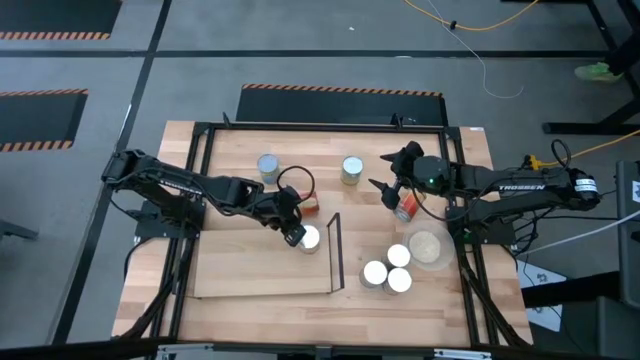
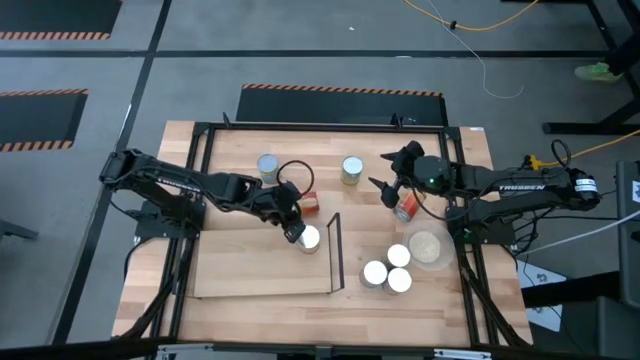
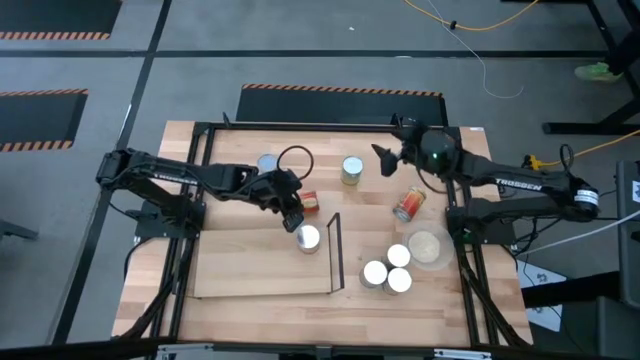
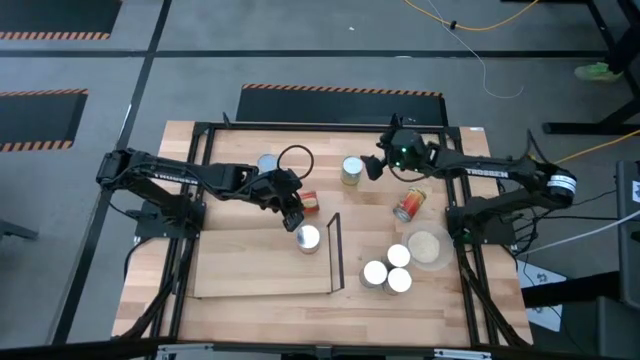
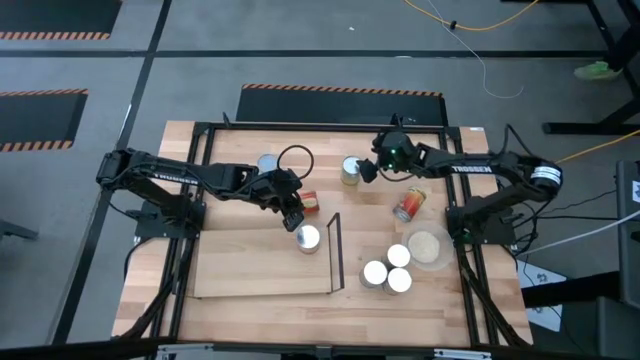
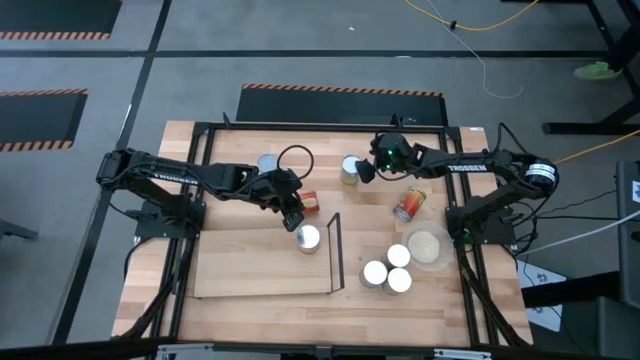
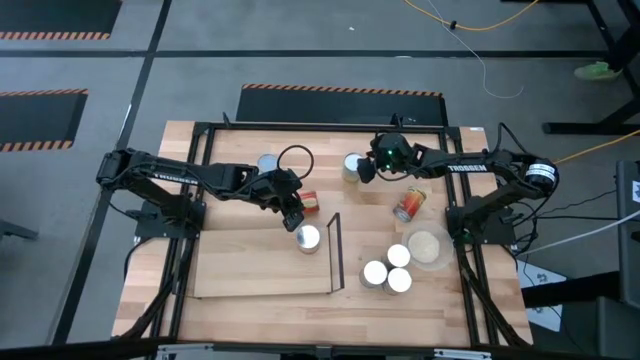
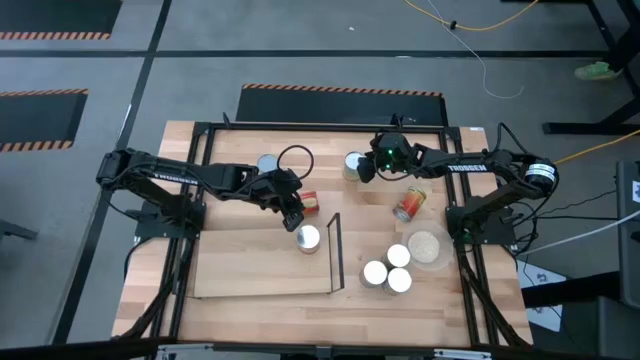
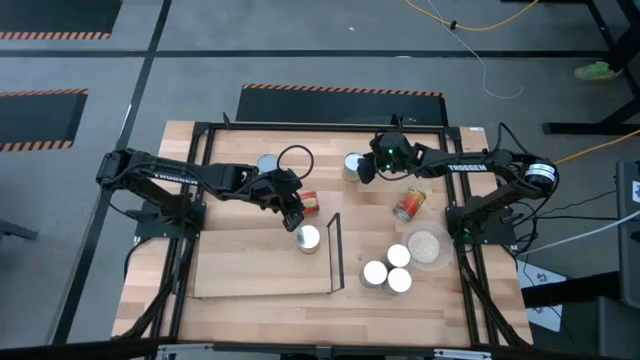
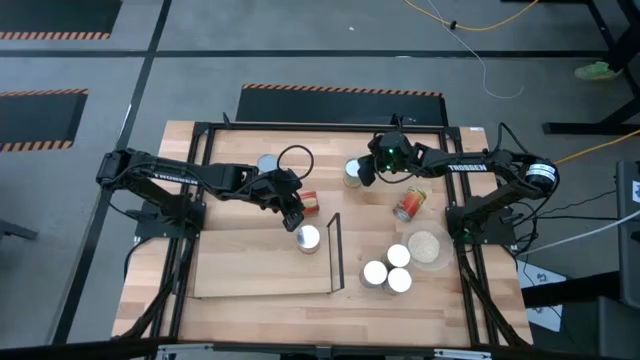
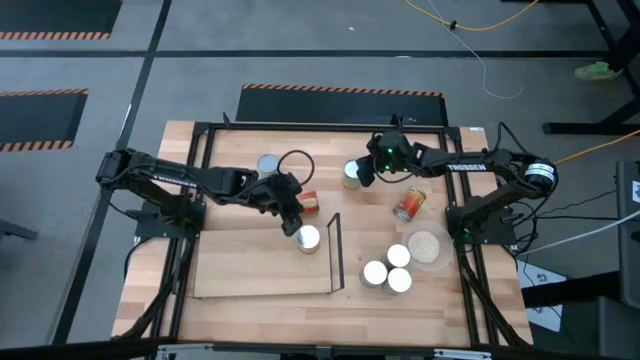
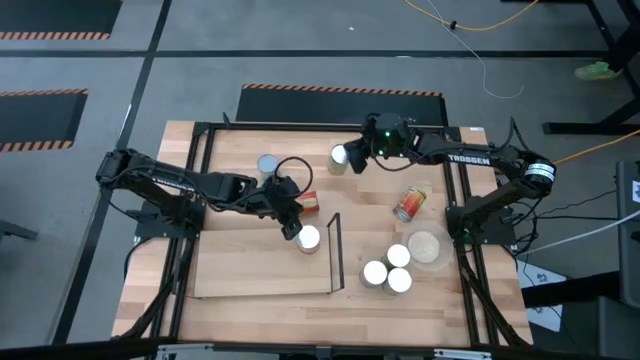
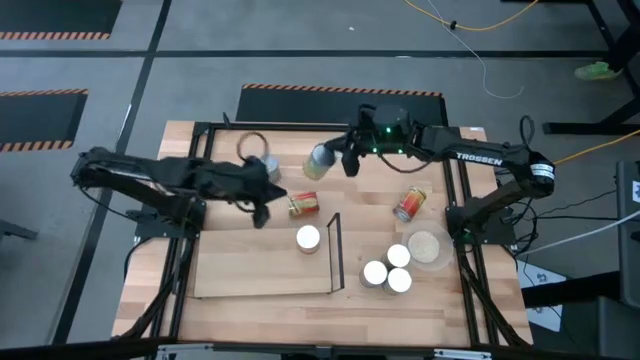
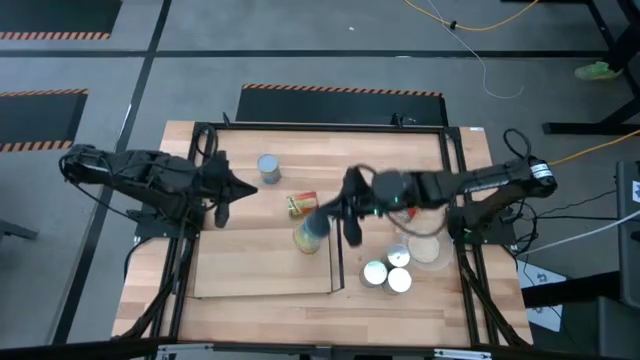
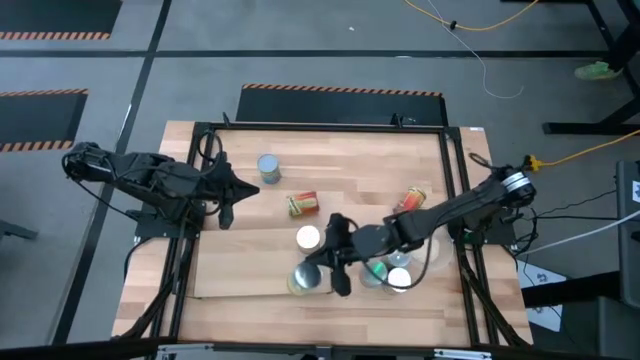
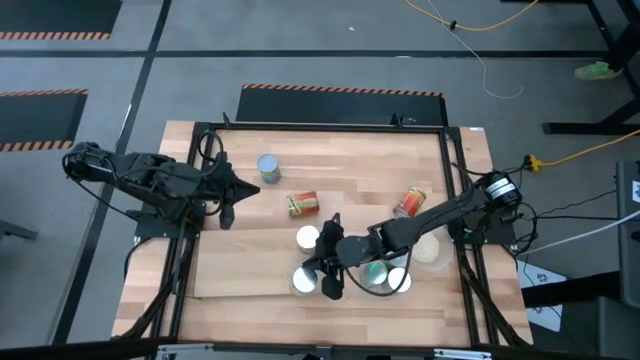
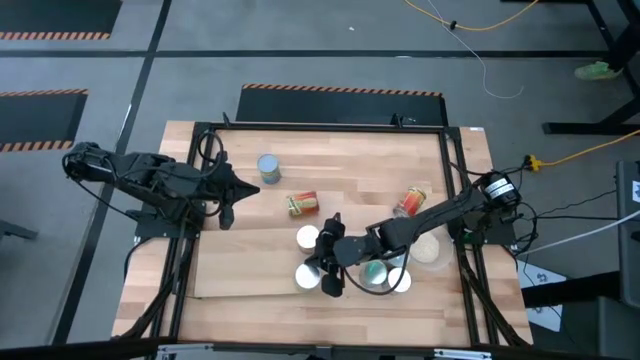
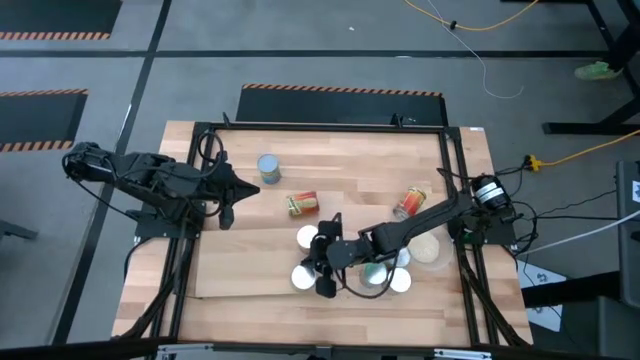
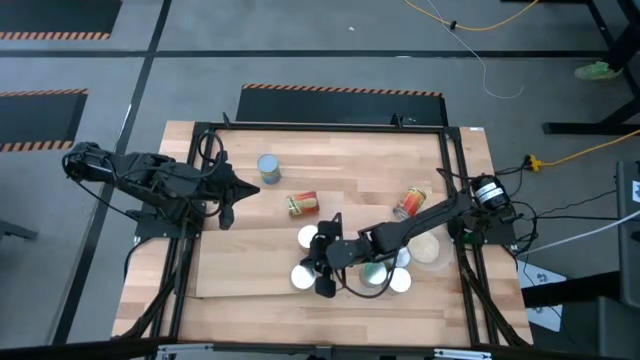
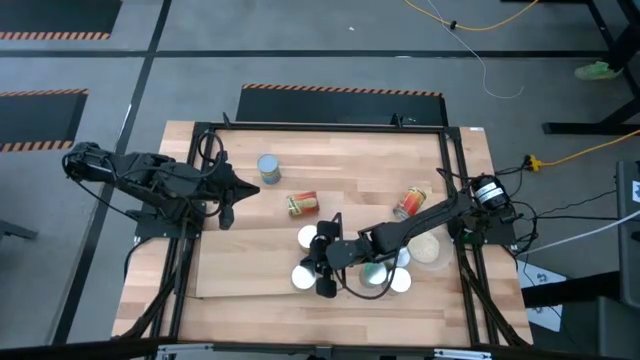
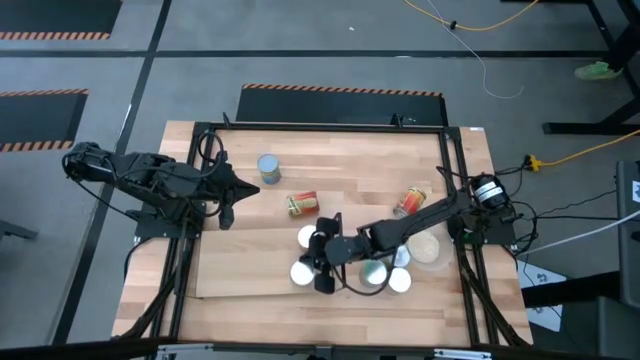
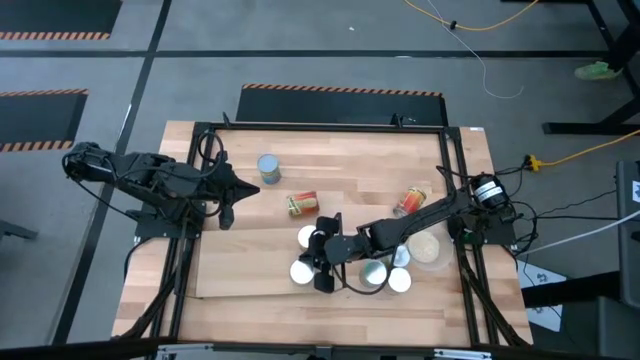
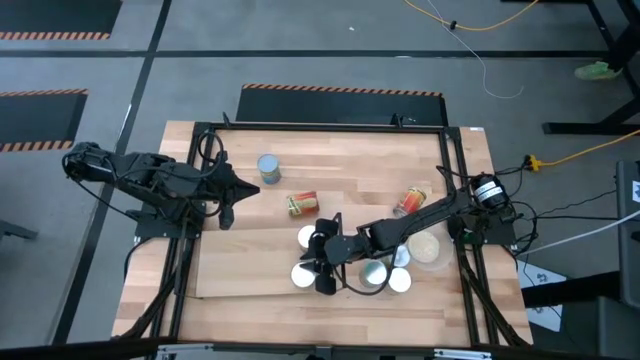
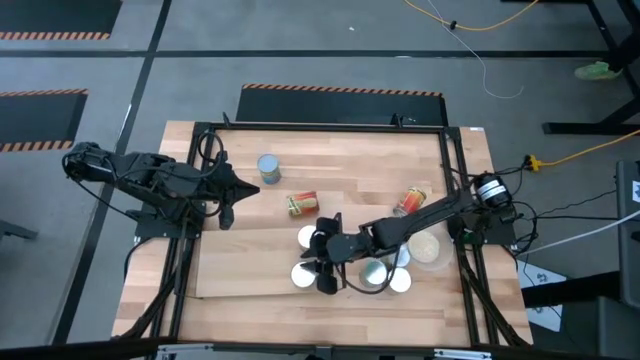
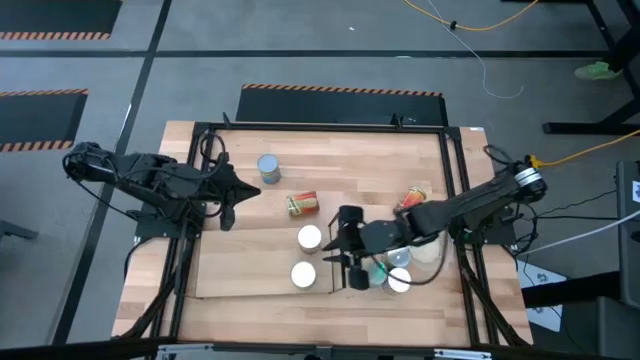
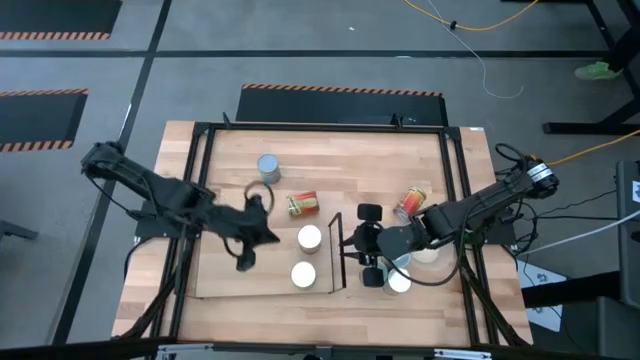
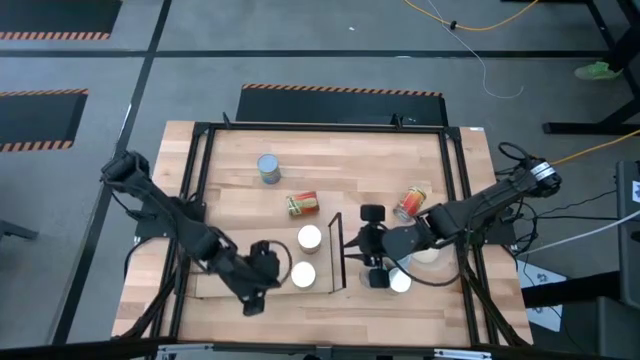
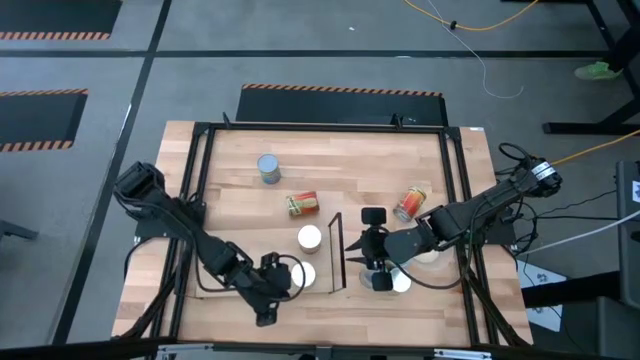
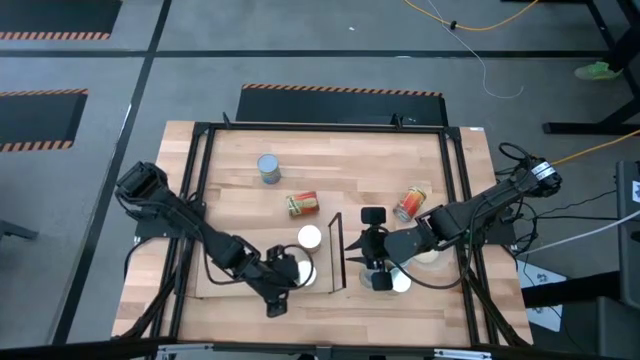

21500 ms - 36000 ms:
Task: Pick and place cans onto a shelf
Put the carrot can on the shelf

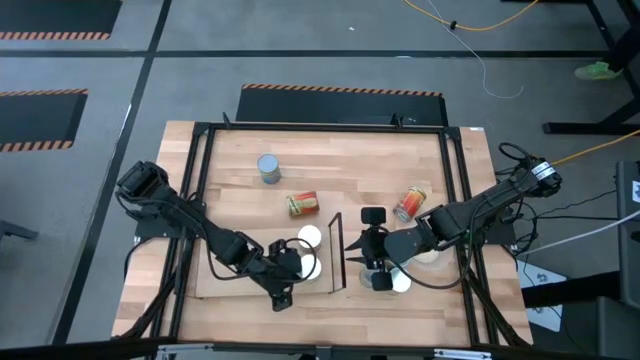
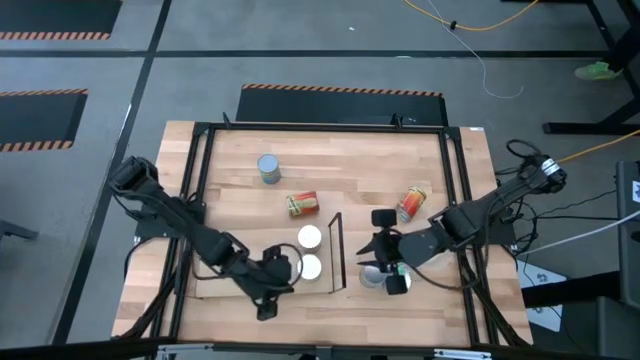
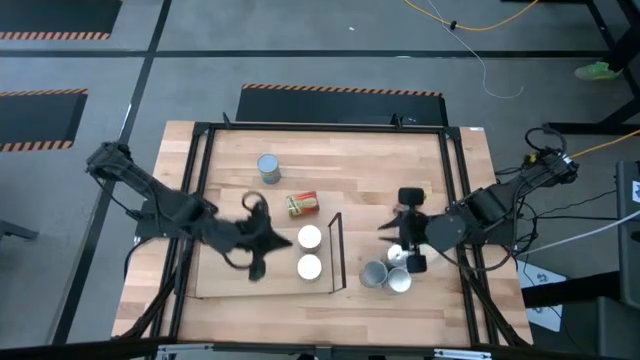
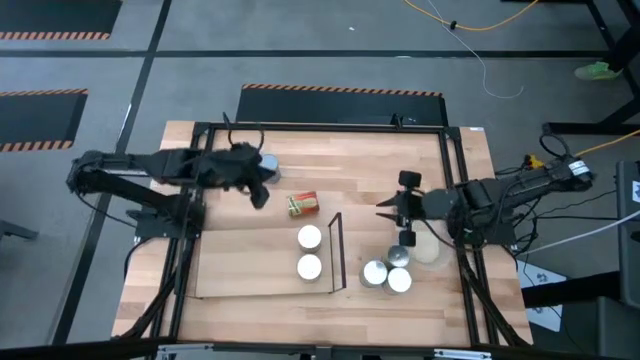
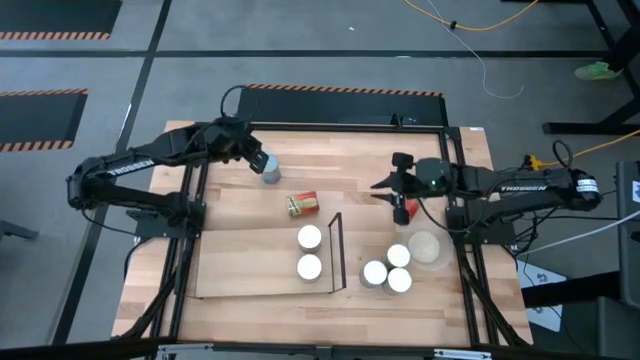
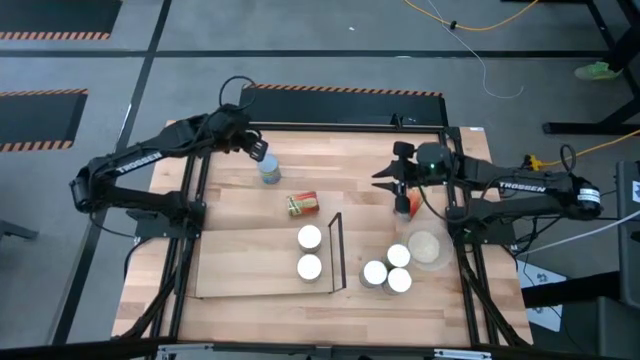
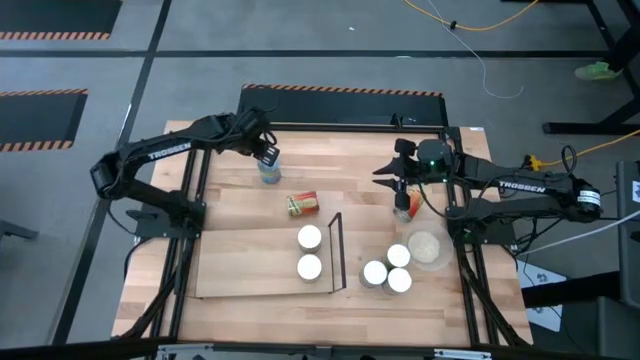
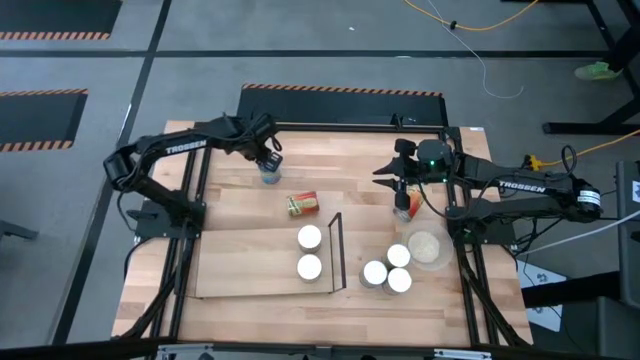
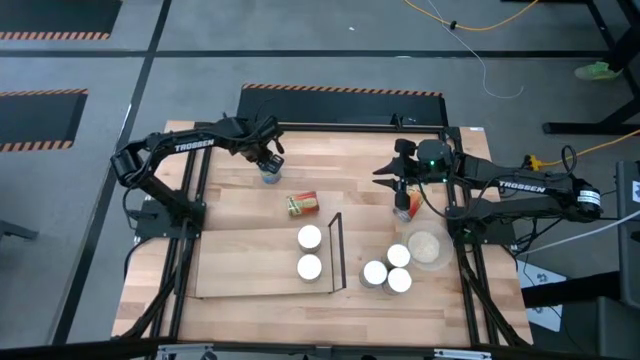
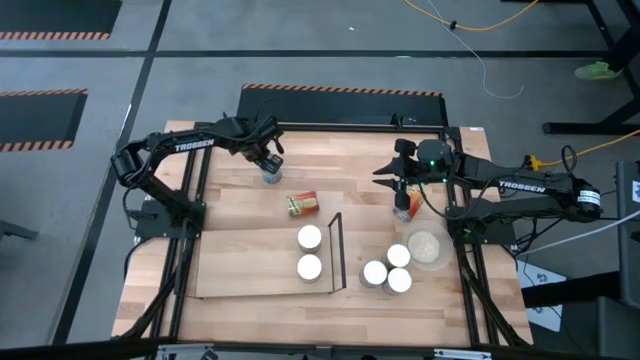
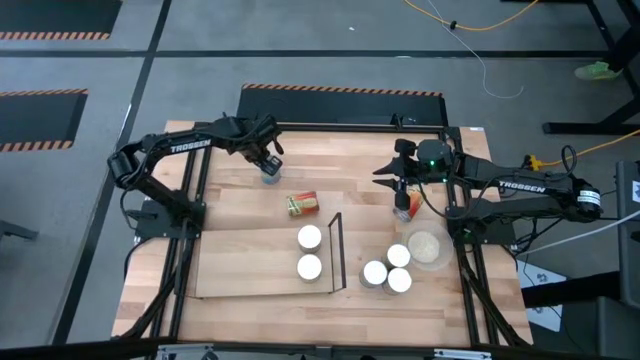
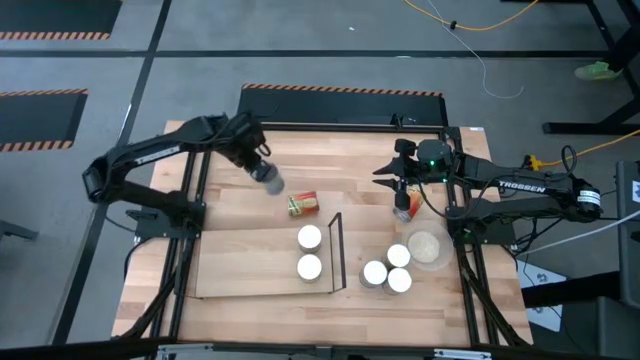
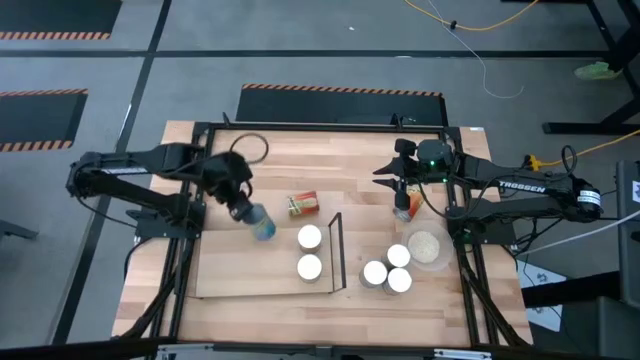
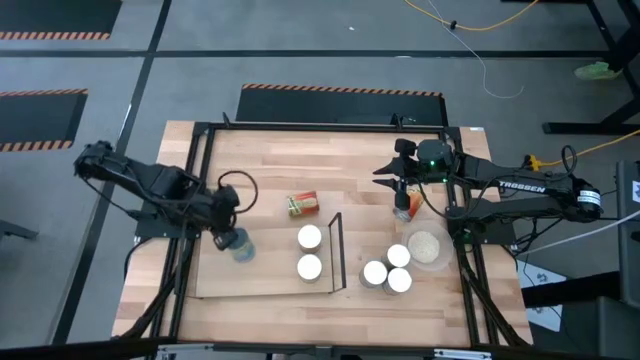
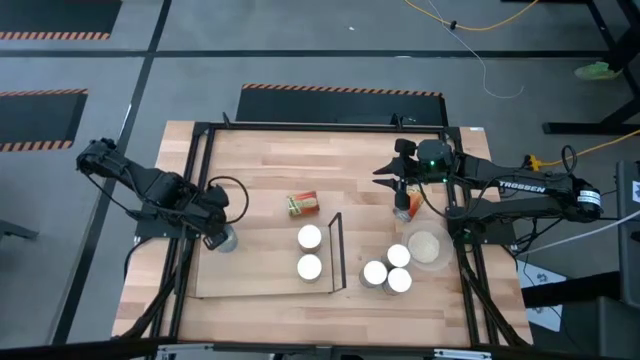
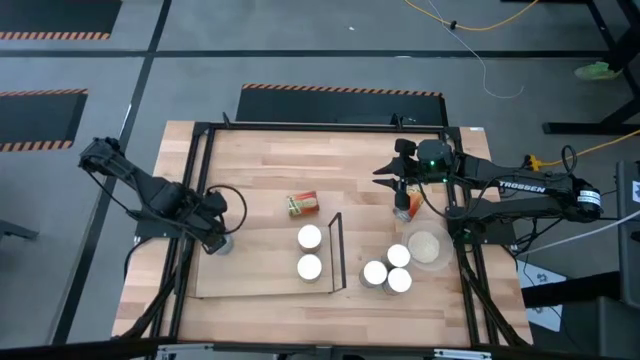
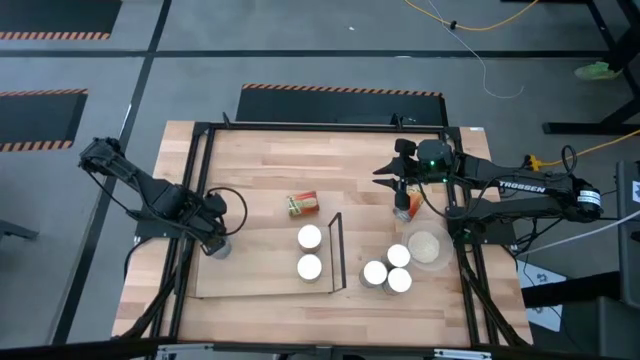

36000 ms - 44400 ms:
Put the cherry can on the shelf
